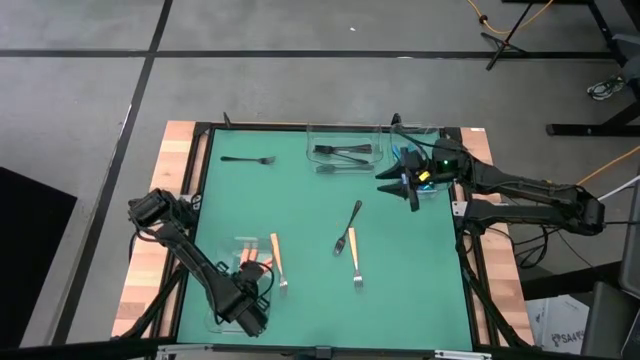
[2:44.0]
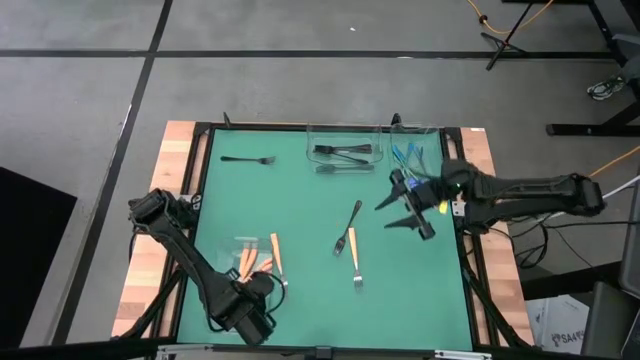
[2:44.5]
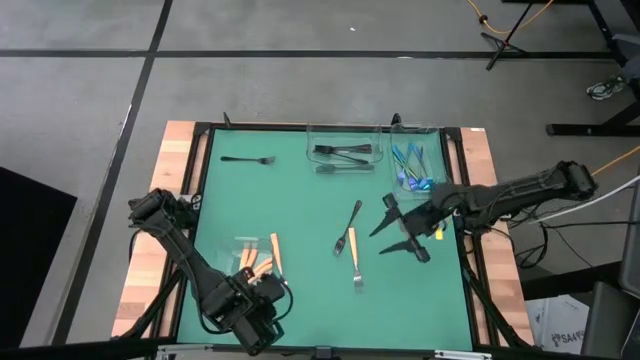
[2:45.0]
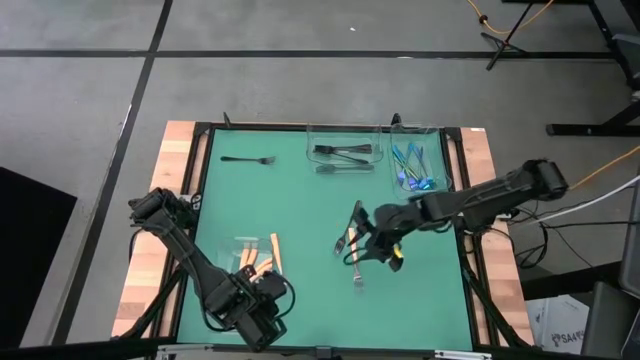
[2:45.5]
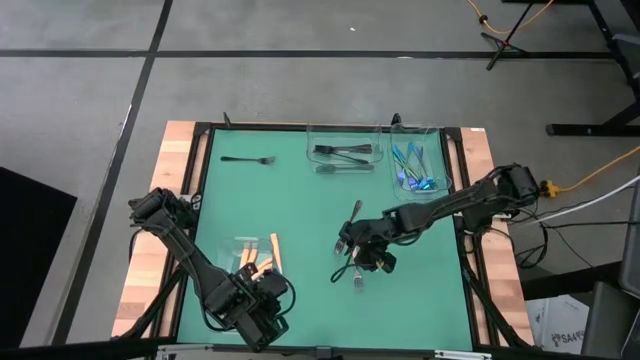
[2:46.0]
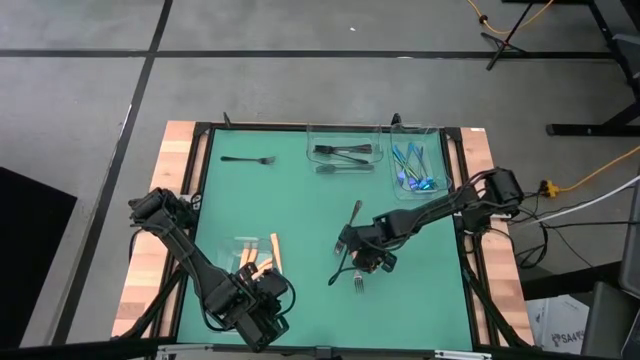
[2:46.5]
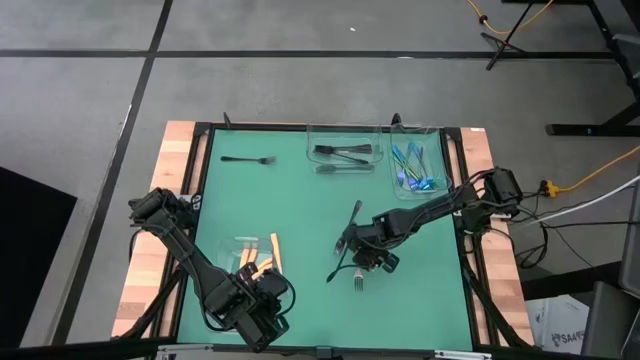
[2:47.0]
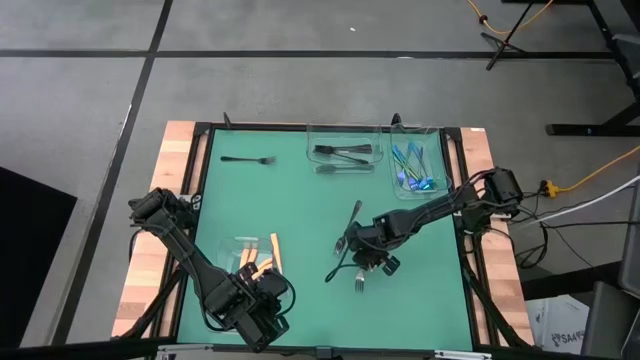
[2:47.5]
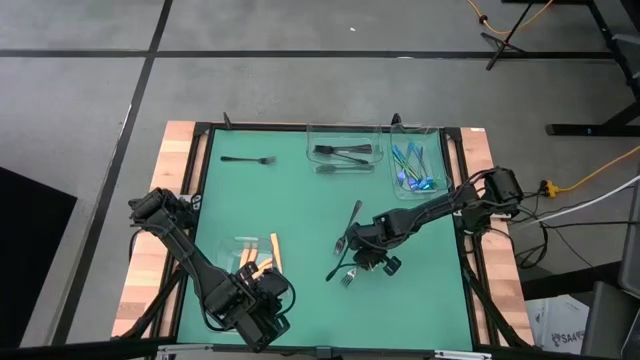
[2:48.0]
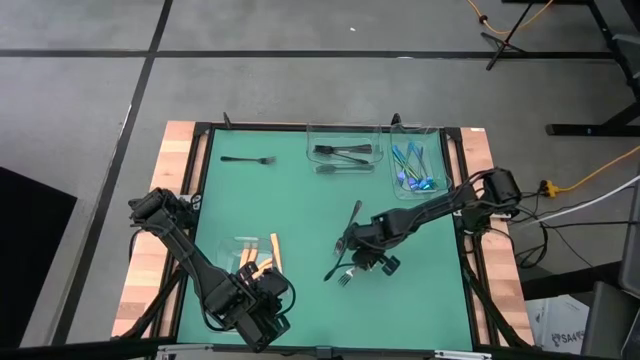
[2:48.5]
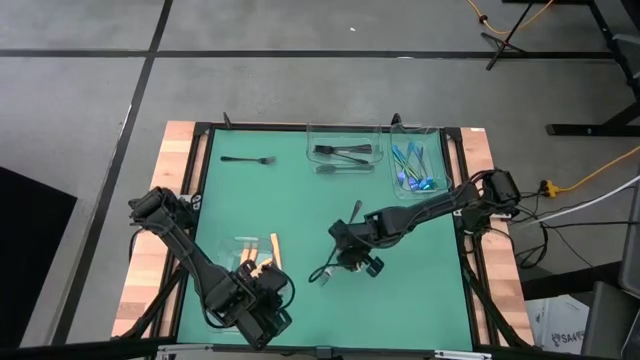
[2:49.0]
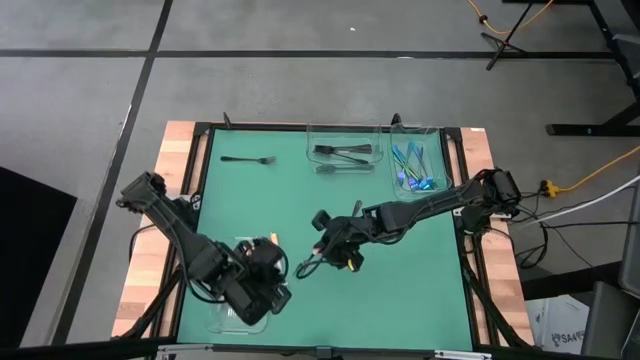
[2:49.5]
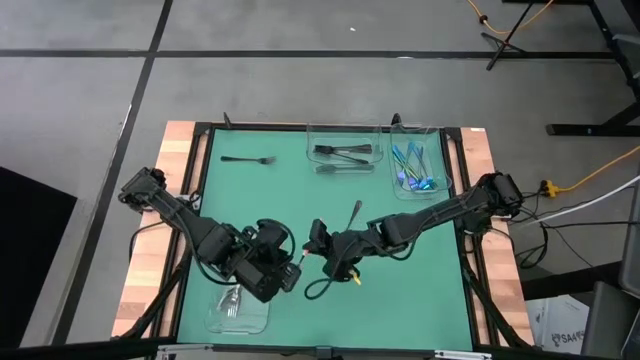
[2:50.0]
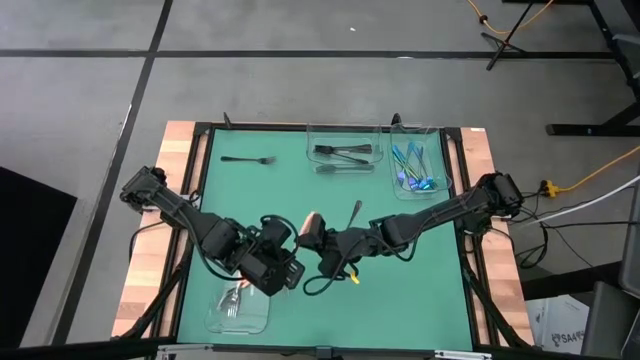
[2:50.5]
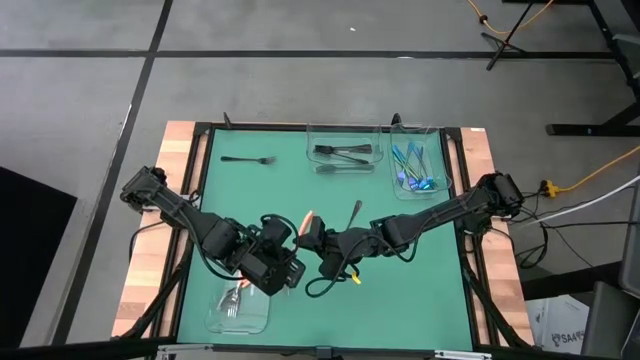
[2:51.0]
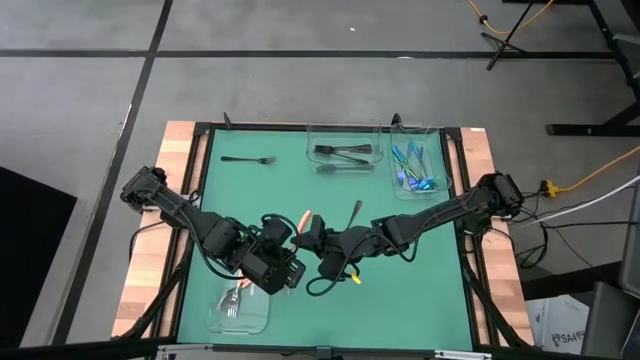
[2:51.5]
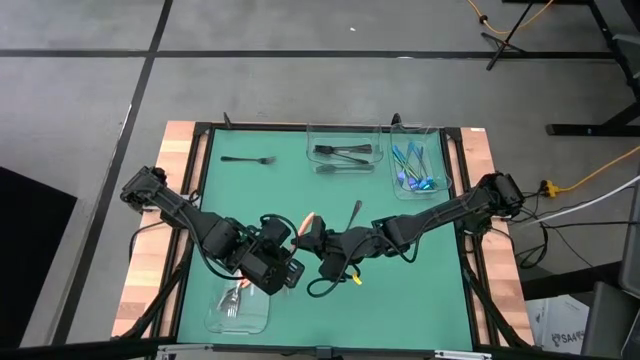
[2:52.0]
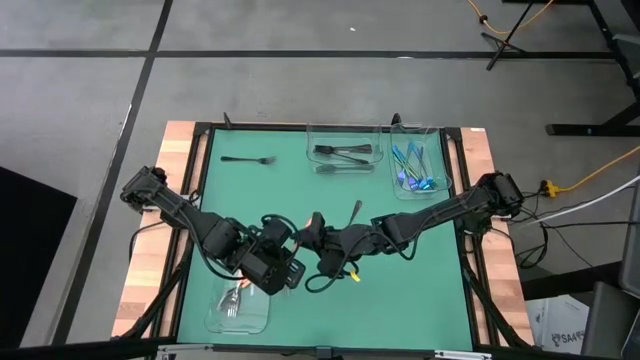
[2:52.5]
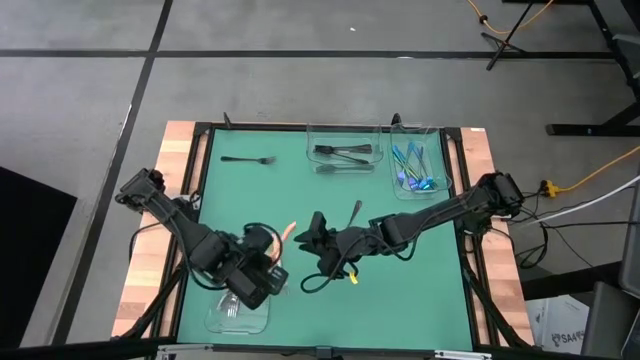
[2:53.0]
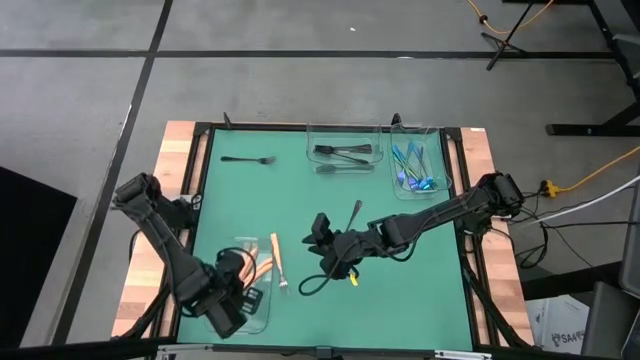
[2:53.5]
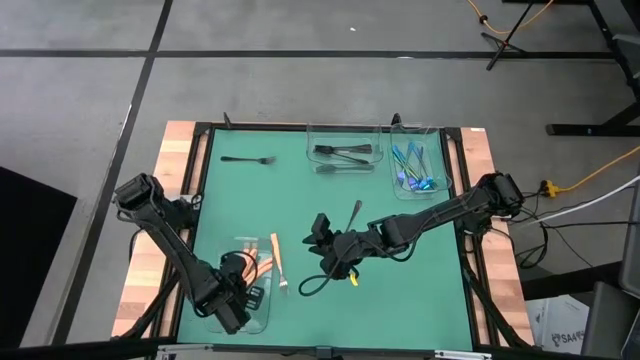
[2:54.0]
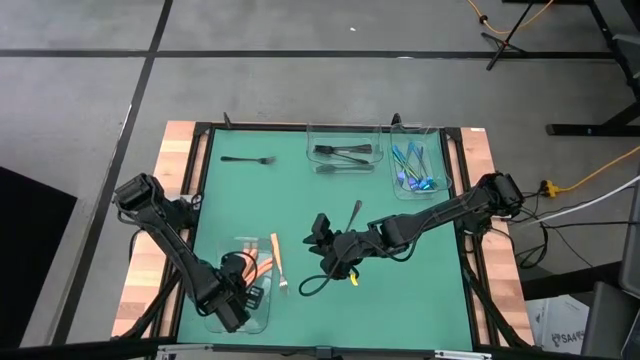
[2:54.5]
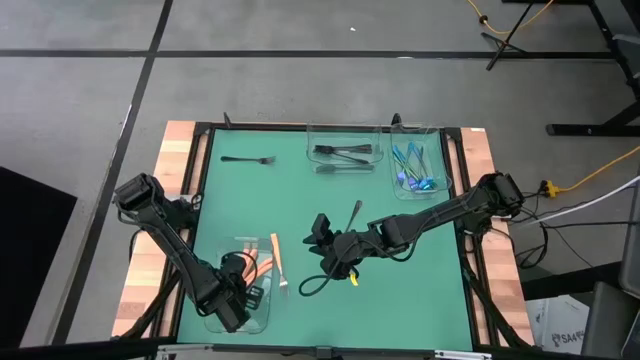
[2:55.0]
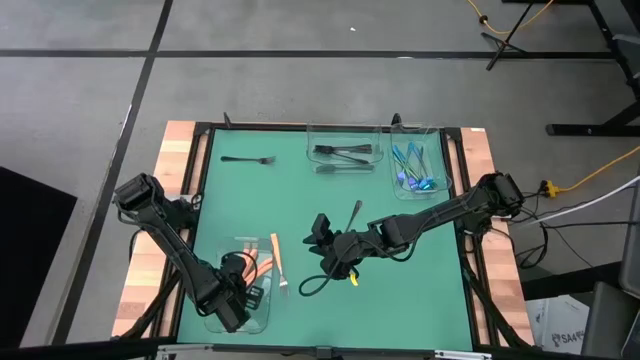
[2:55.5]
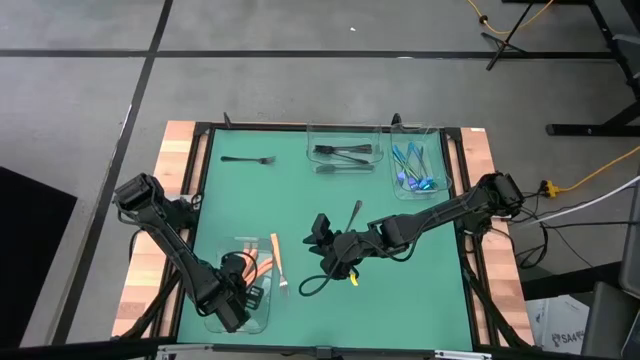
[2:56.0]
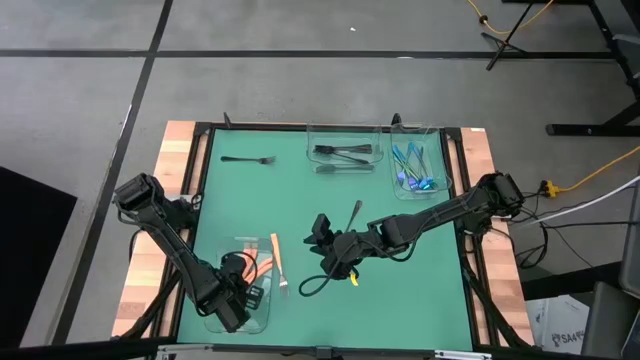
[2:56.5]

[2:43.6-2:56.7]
Task: Sort silverware by color (type)
Put the orange fork into the bottom transparent bin

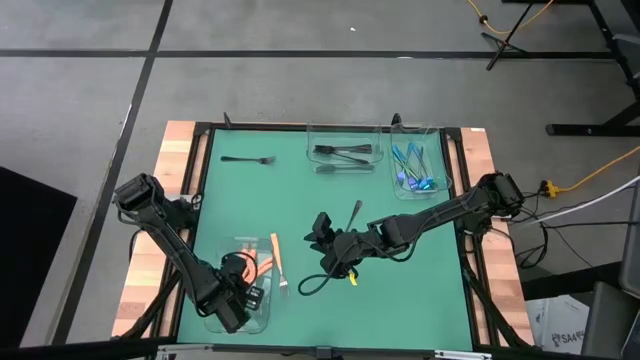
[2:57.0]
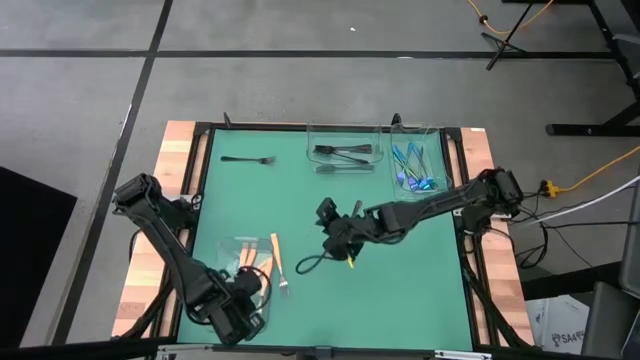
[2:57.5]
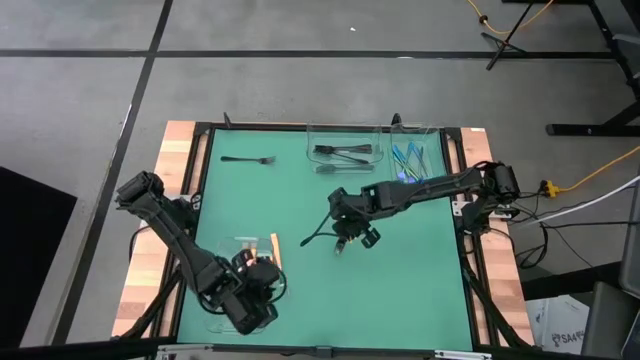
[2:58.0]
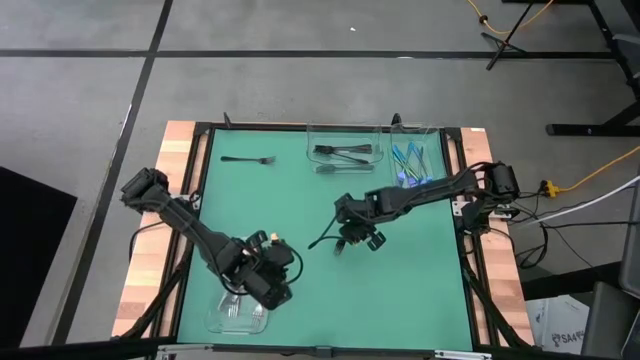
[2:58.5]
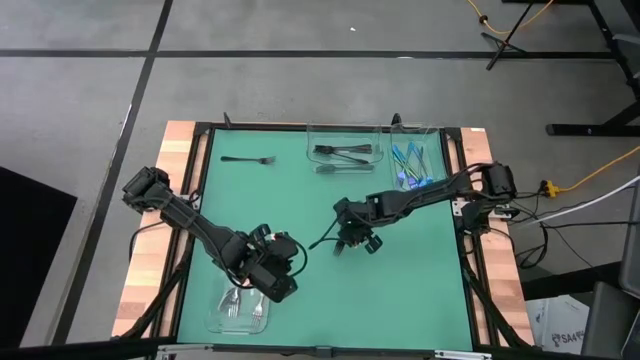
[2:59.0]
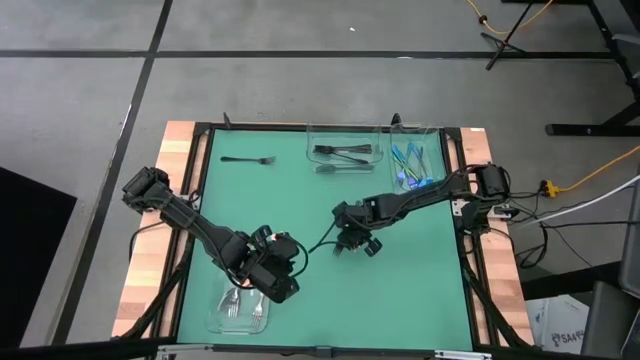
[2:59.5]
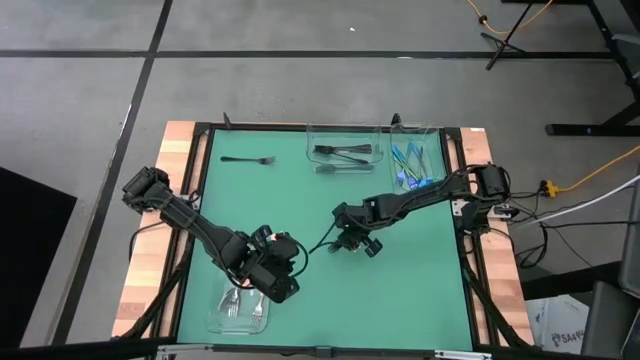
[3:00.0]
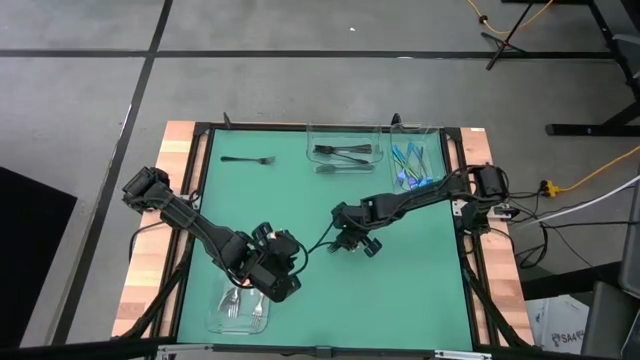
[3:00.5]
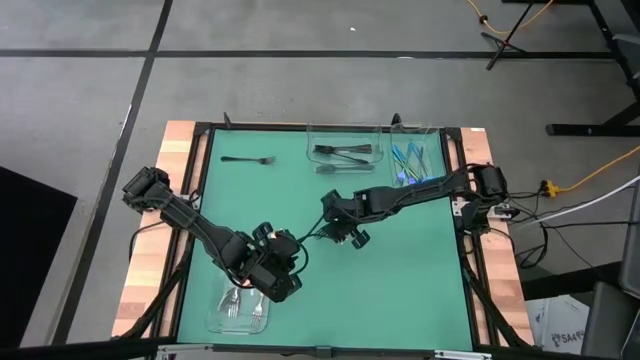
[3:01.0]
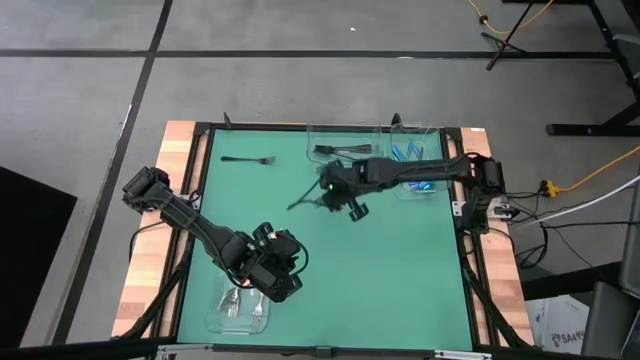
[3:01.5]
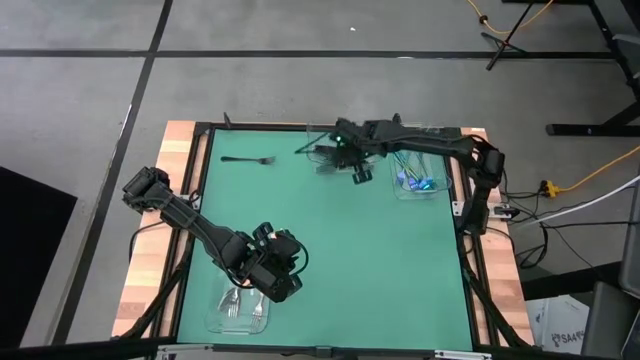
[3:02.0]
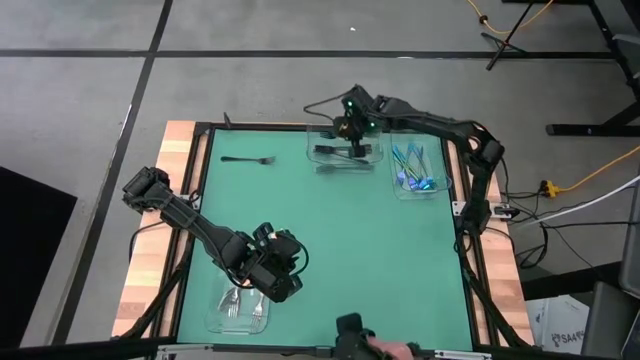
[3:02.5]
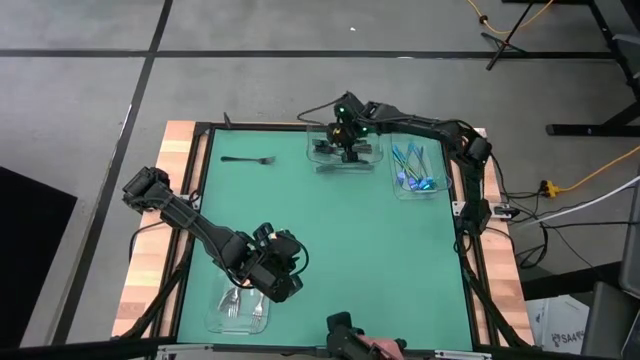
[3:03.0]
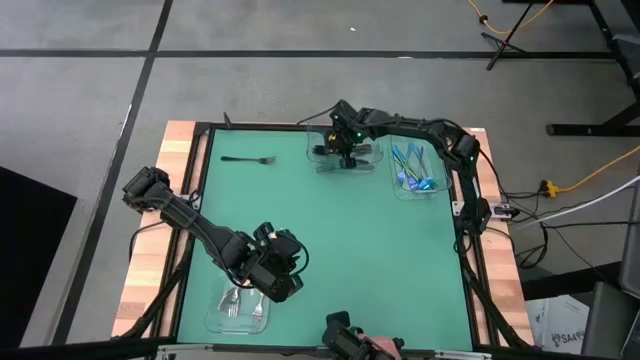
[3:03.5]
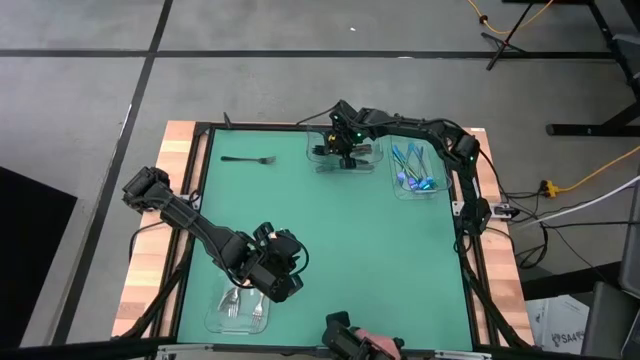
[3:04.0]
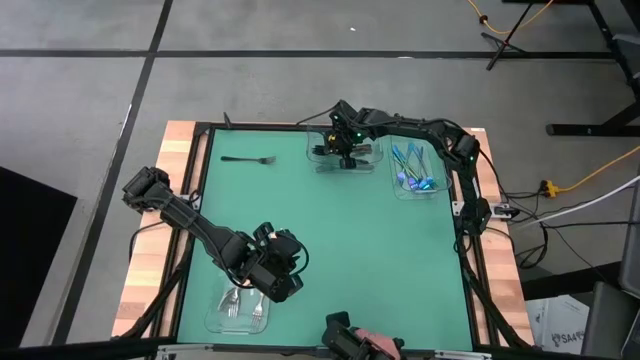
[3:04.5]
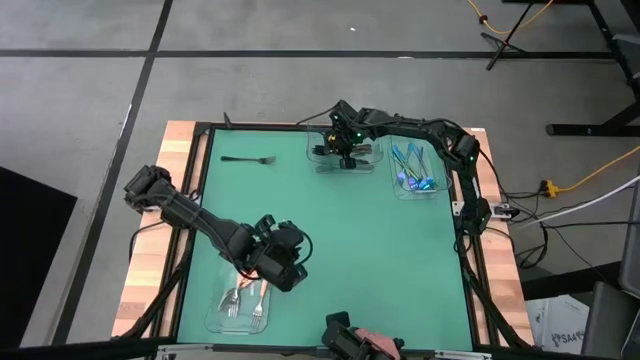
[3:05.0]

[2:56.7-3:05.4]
Put the black fork into the top left transparent bin
